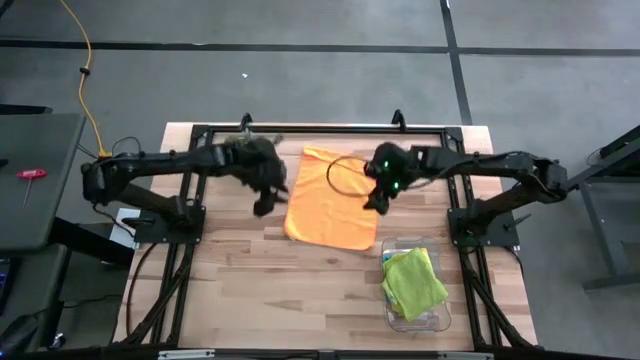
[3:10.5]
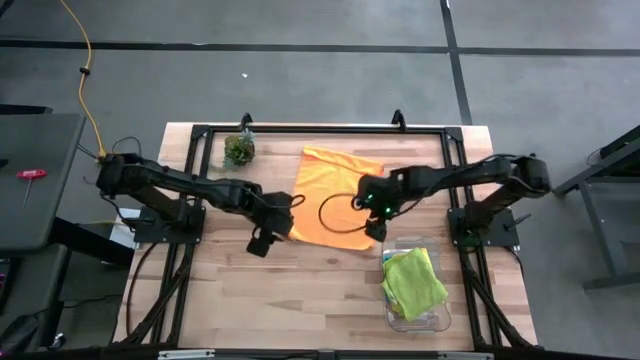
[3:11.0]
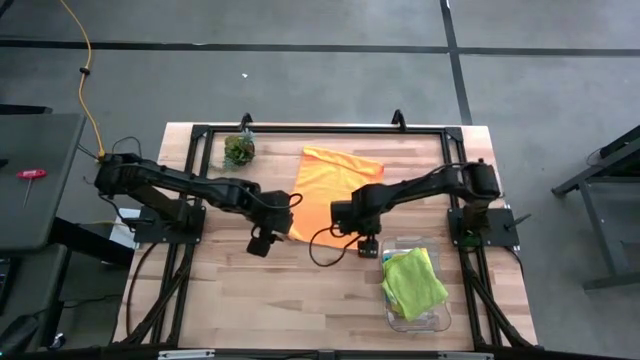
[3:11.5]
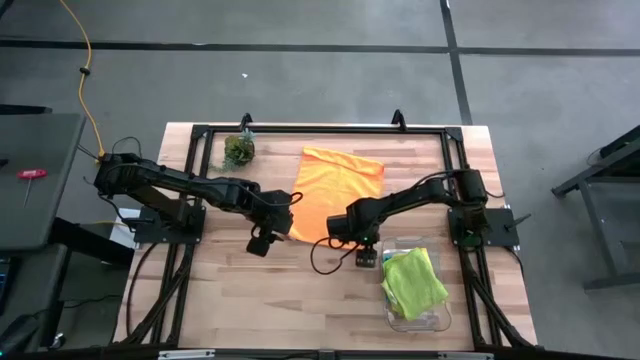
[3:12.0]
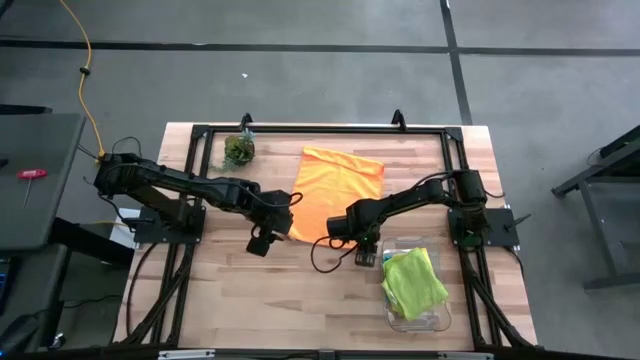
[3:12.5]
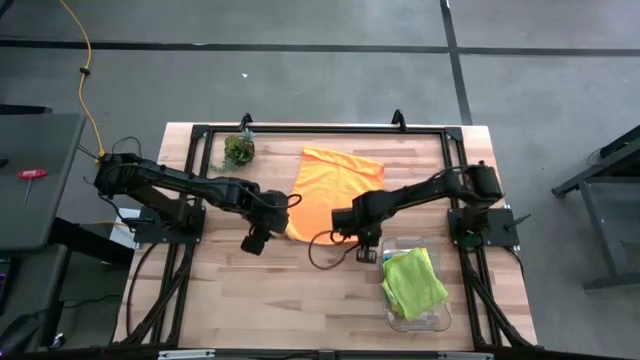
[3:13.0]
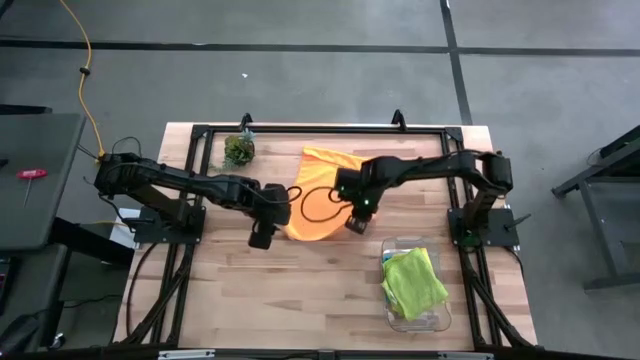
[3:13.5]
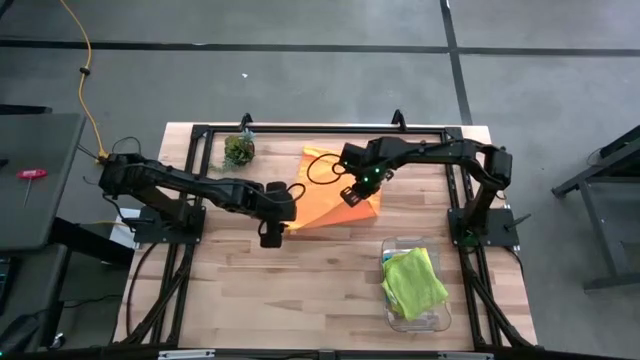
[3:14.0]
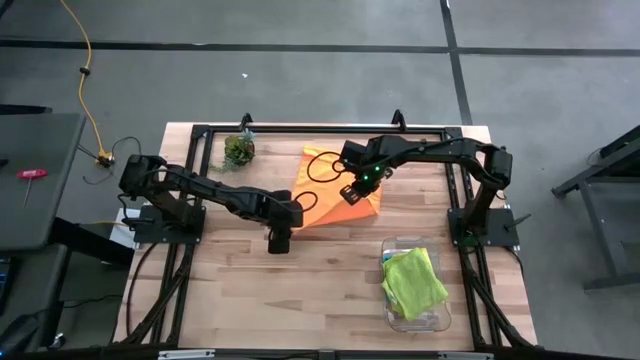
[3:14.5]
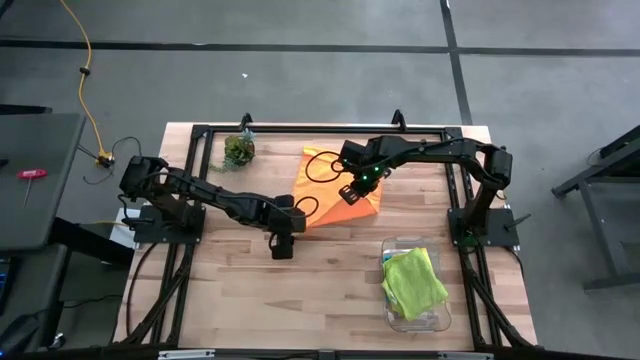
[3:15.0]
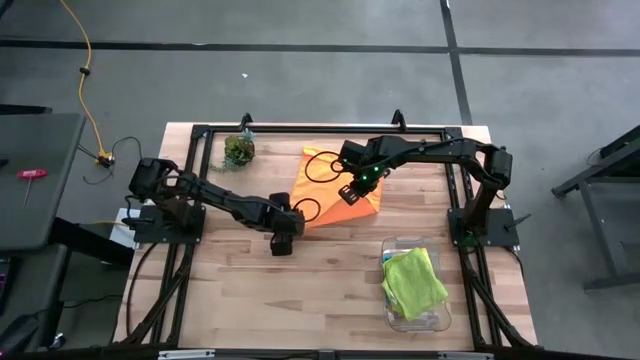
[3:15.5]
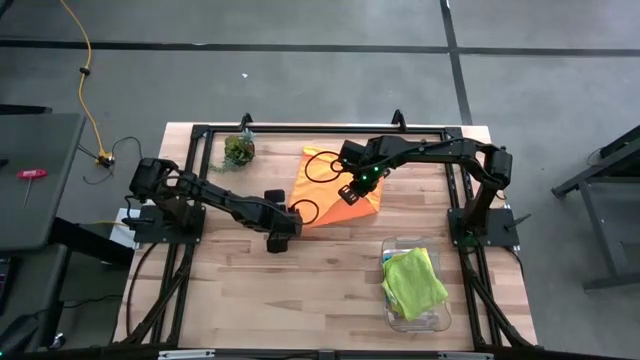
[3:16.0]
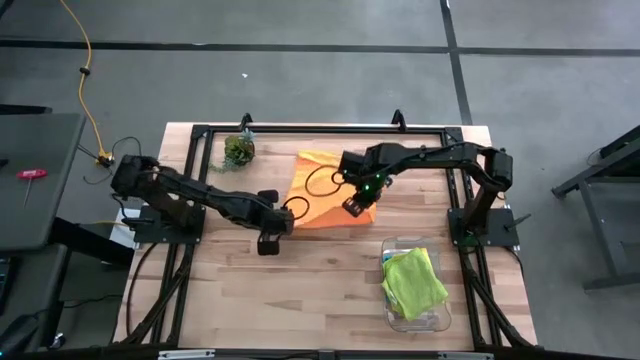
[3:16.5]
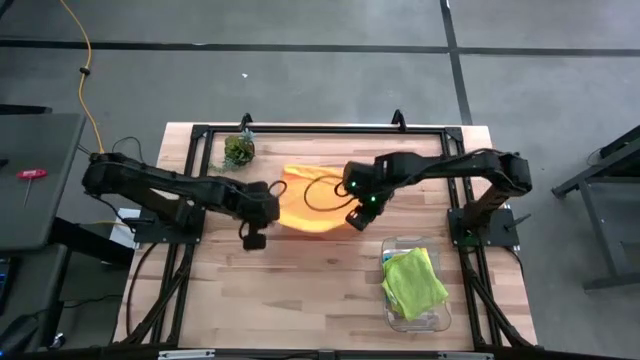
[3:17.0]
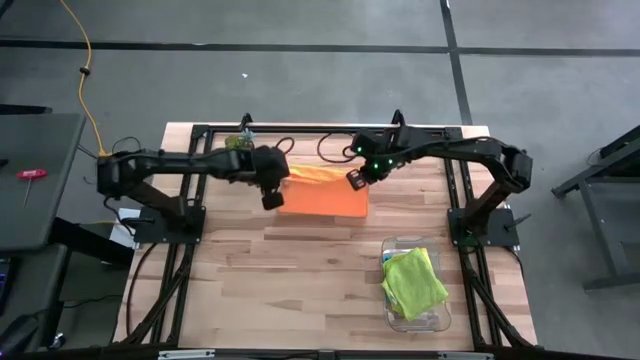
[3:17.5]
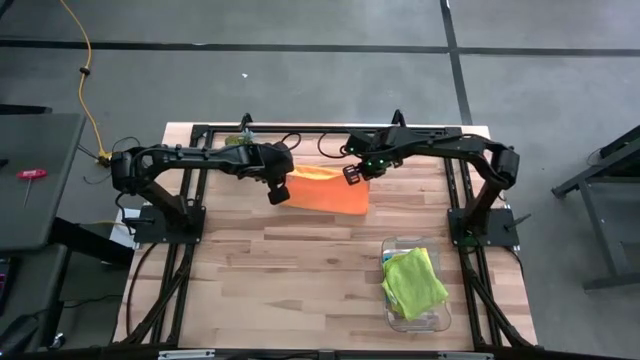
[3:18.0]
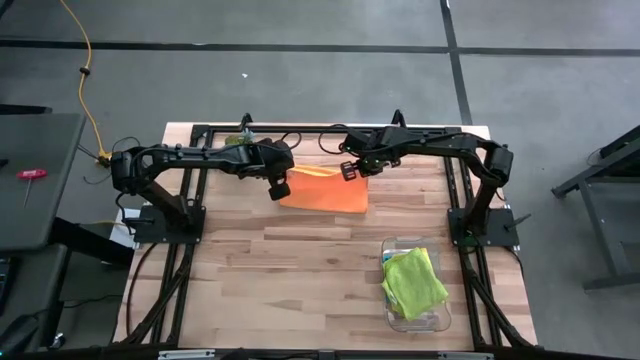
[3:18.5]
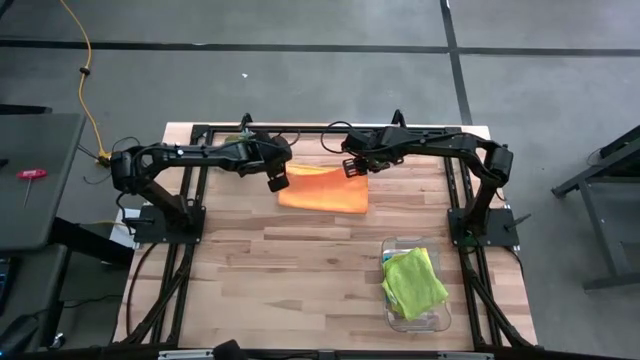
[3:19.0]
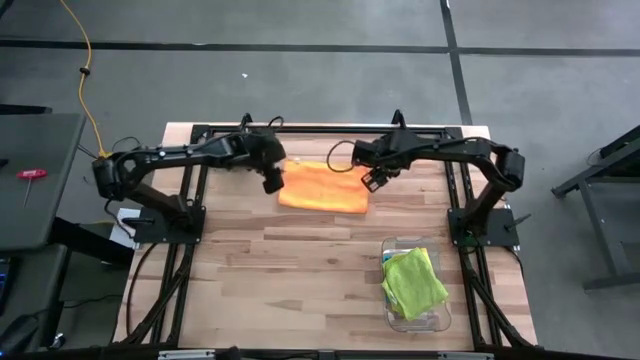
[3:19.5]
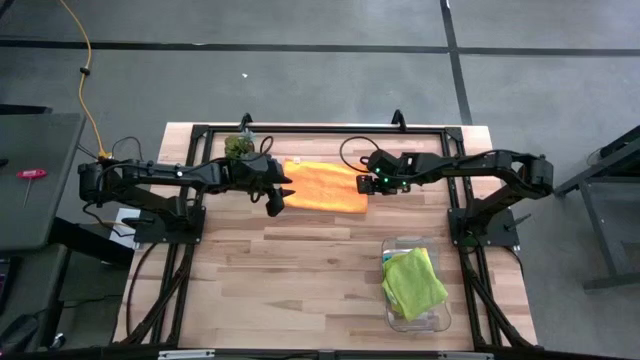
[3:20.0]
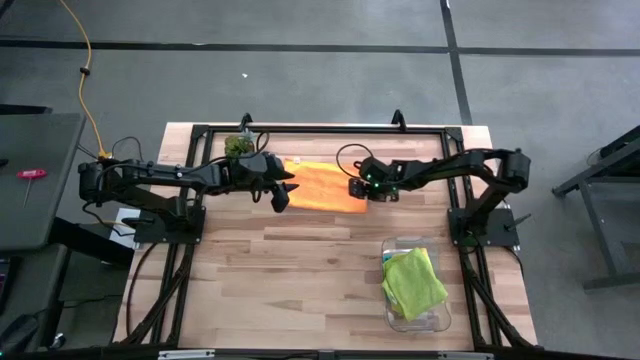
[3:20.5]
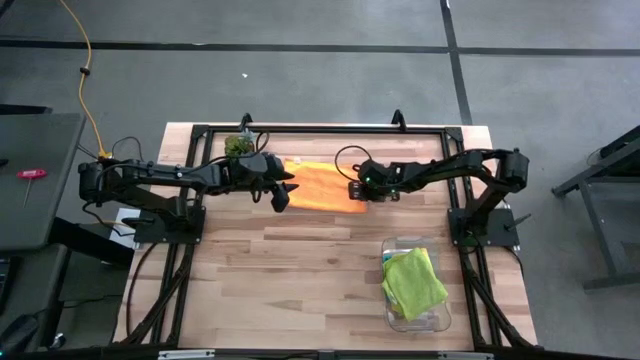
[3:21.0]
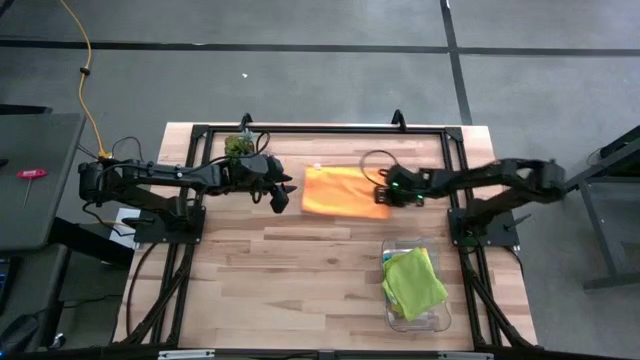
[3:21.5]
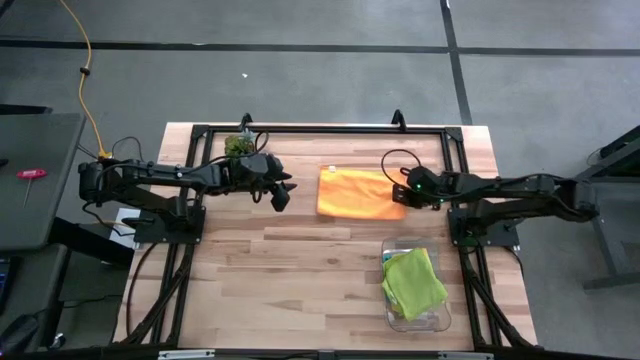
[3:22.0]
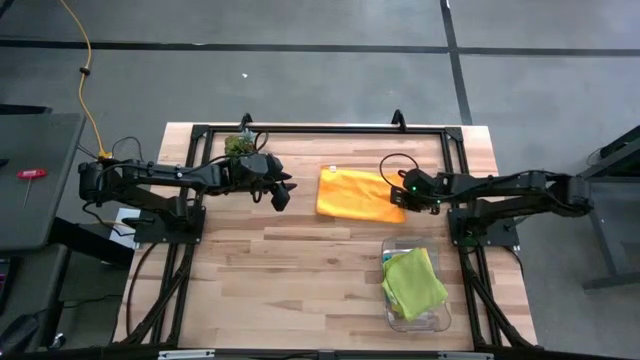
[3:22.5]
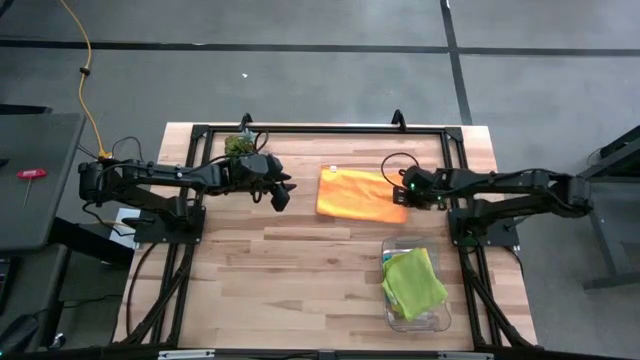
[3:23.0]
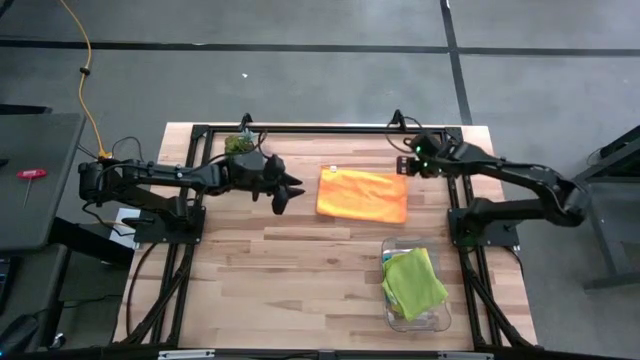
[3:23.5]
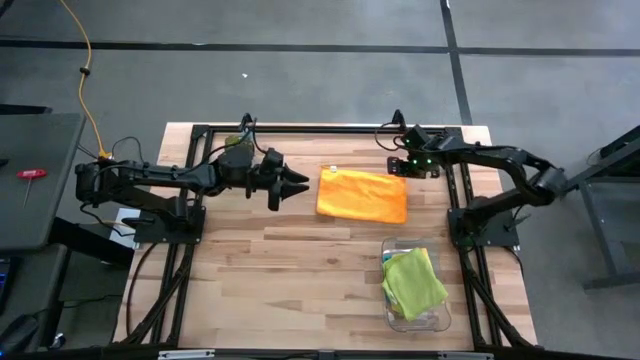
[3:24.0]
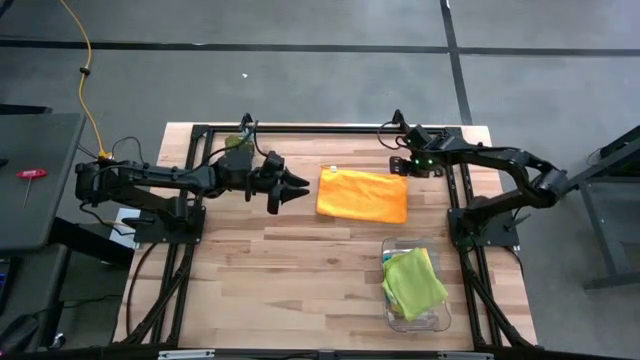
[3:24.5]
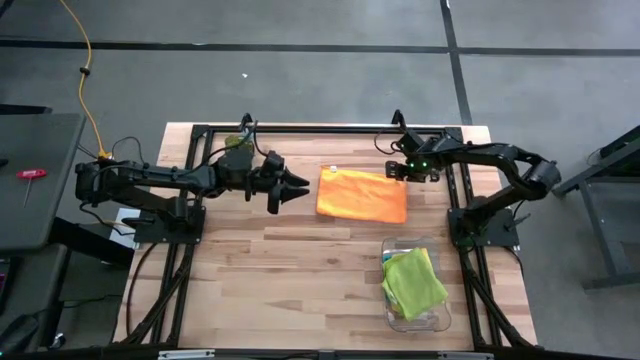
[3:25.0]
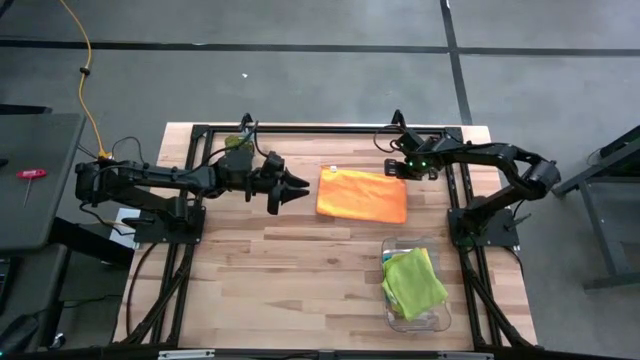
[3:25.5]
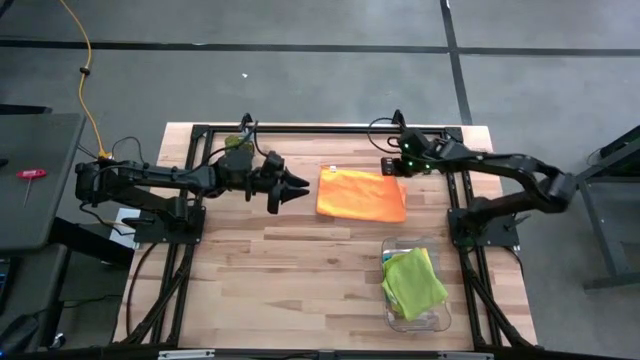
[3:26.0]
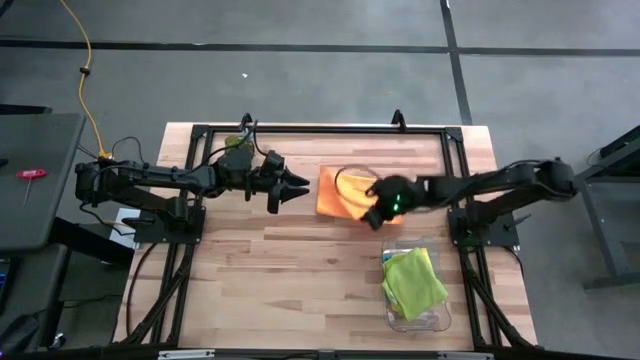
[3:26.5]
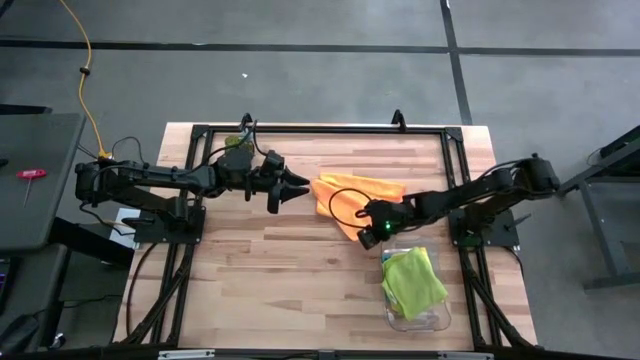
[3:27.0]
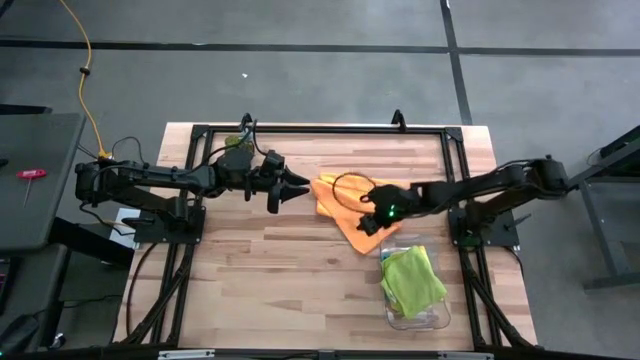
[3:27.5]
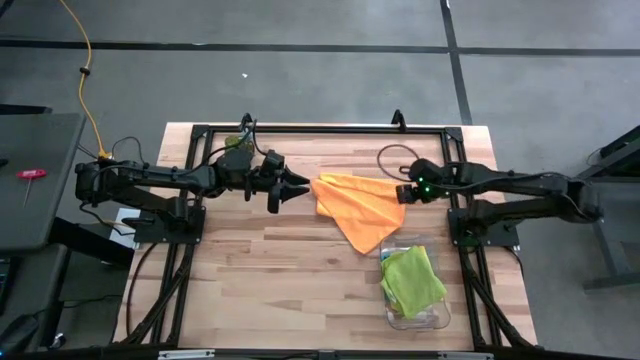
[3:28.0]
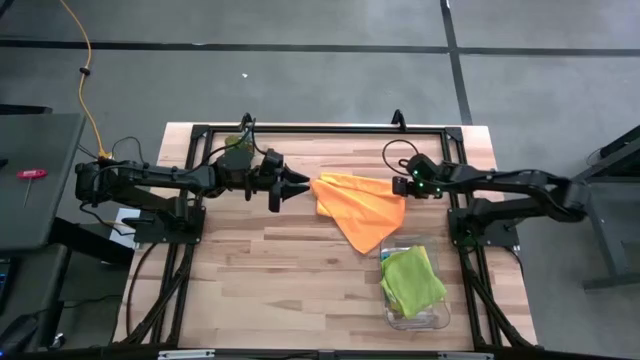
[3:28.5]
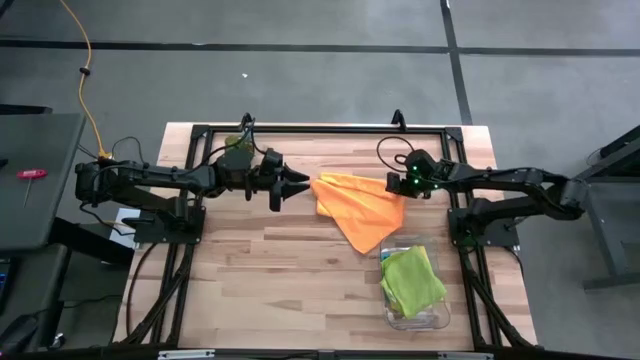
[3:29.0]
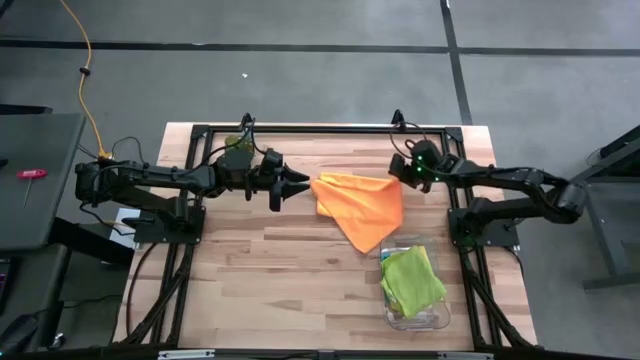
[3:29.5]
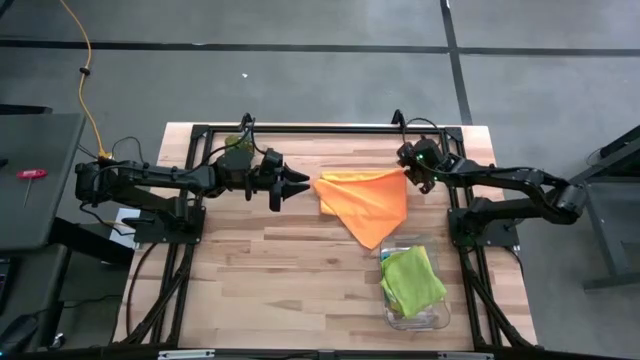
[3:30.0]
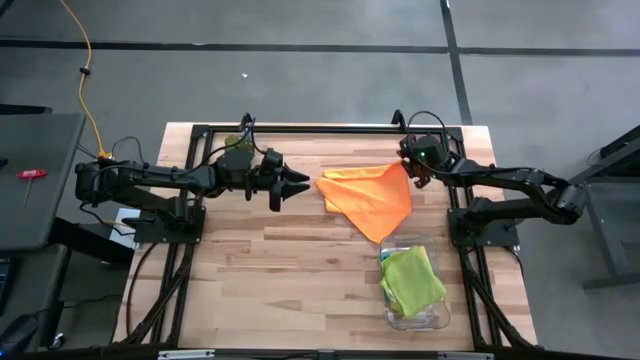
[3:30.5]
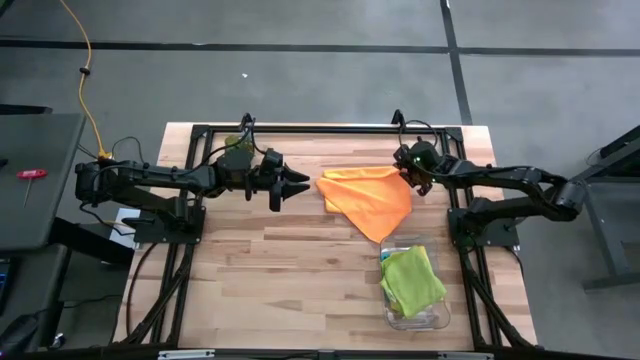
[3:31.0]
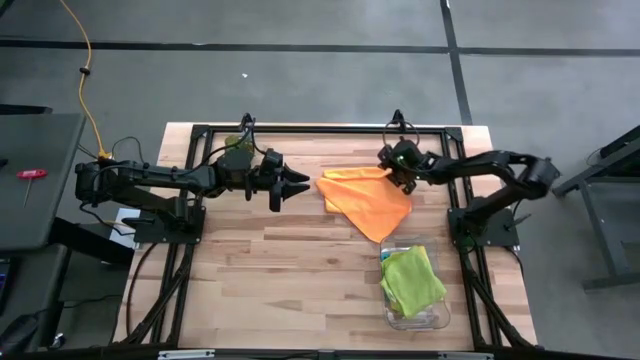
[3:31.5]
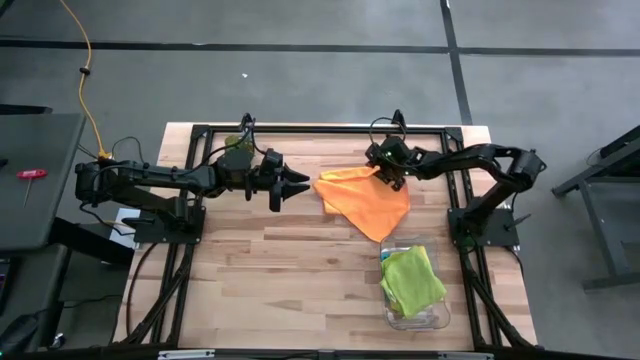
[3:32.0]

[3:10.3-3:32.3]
Task: Fold microfiber towels
Fold the orange microfiber cloth
